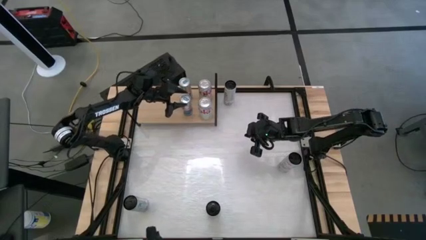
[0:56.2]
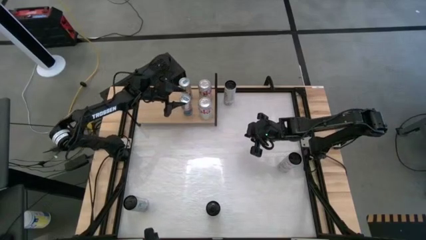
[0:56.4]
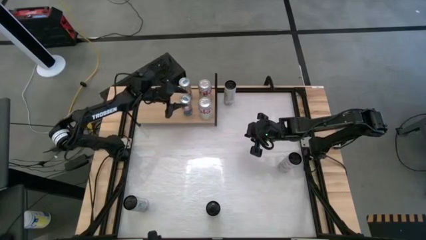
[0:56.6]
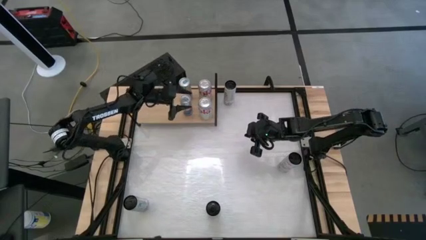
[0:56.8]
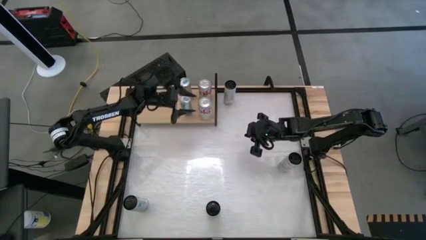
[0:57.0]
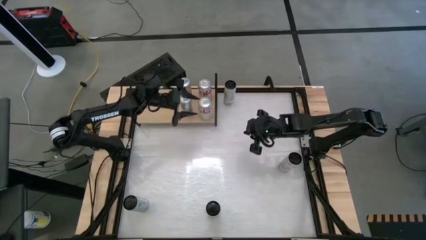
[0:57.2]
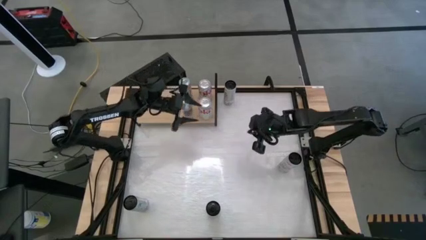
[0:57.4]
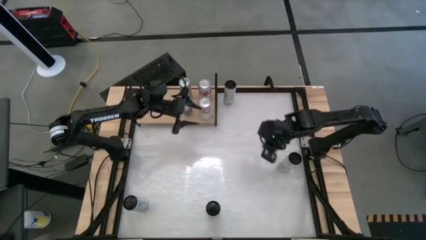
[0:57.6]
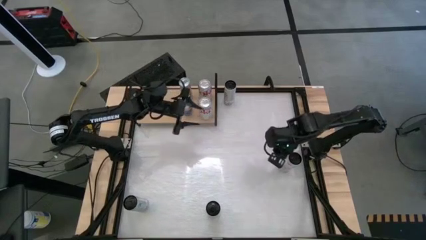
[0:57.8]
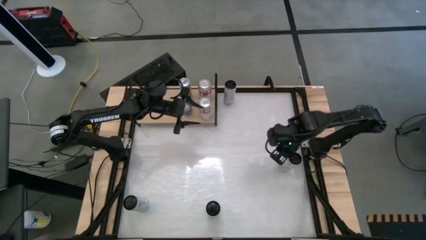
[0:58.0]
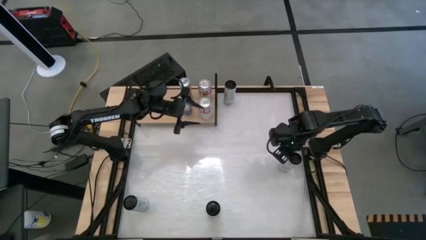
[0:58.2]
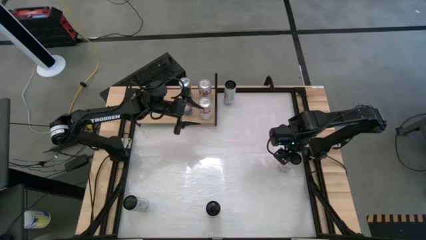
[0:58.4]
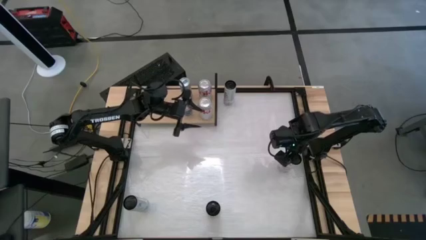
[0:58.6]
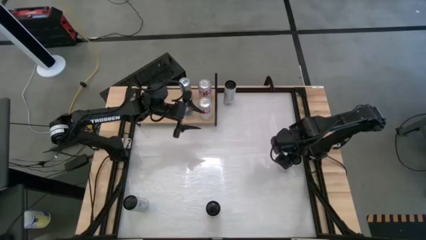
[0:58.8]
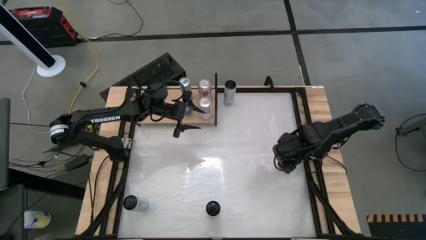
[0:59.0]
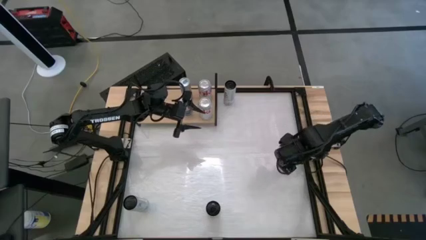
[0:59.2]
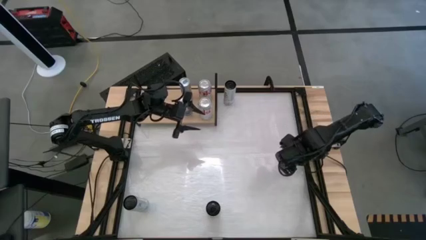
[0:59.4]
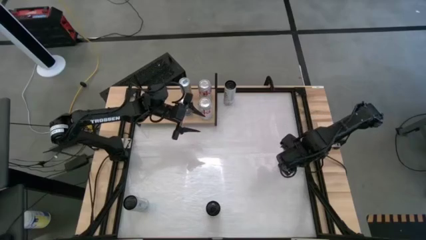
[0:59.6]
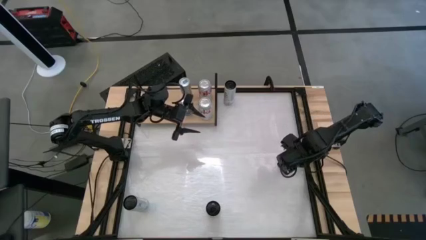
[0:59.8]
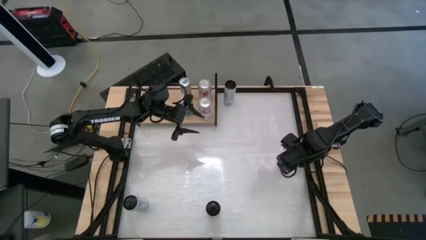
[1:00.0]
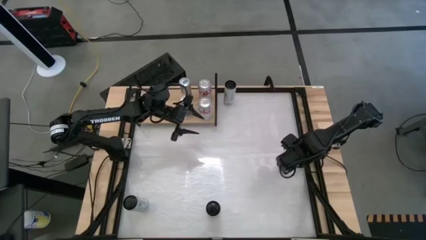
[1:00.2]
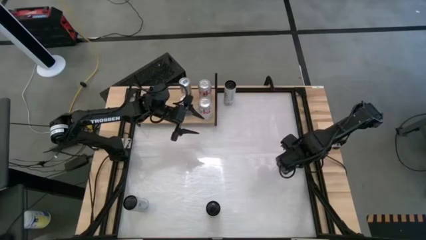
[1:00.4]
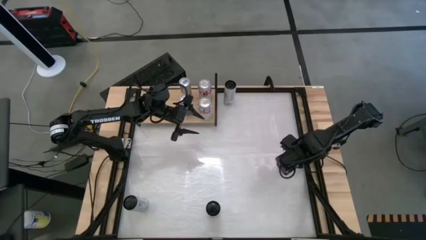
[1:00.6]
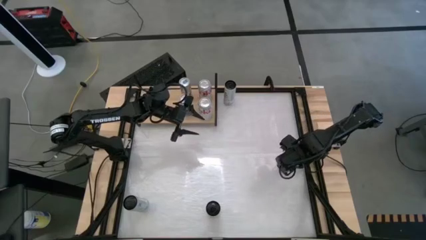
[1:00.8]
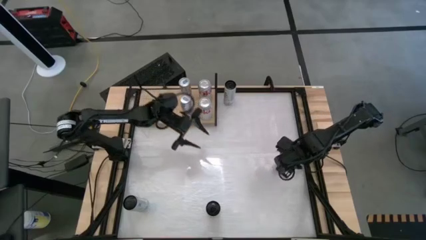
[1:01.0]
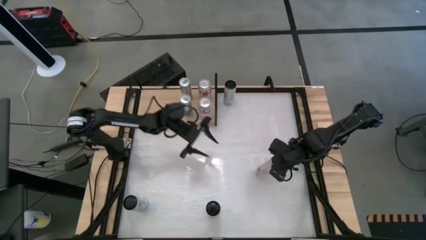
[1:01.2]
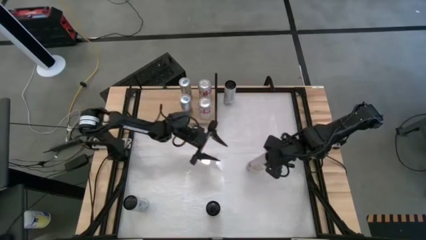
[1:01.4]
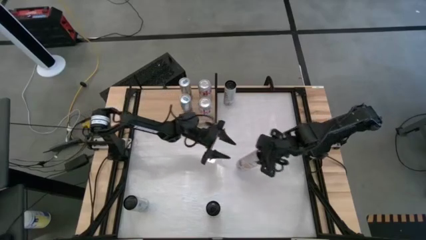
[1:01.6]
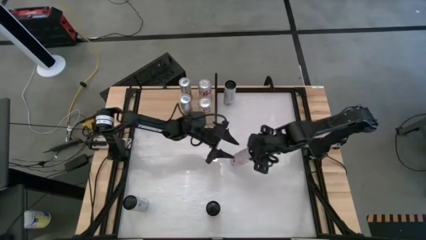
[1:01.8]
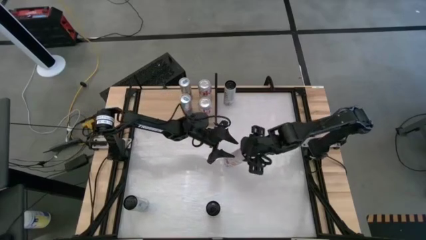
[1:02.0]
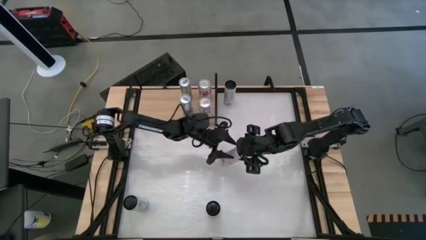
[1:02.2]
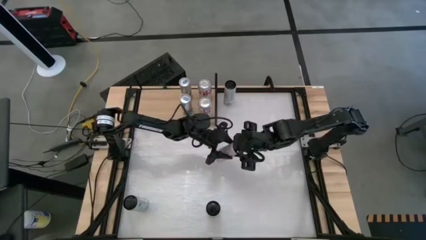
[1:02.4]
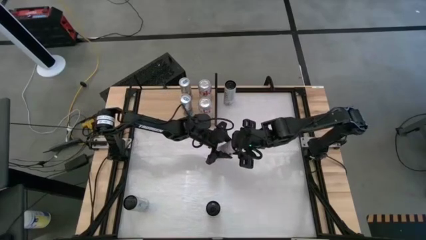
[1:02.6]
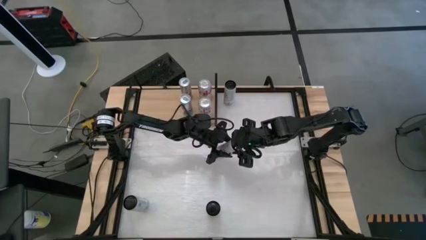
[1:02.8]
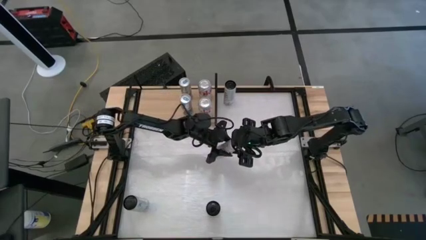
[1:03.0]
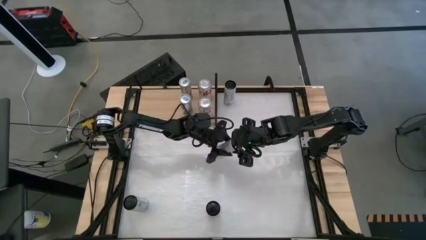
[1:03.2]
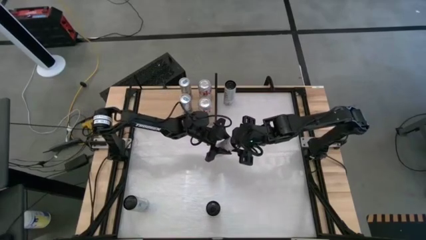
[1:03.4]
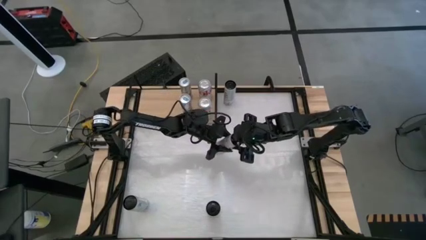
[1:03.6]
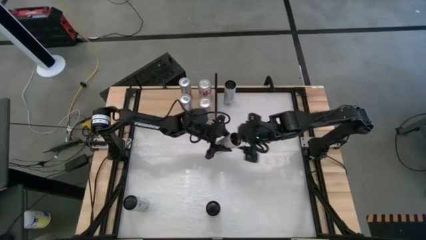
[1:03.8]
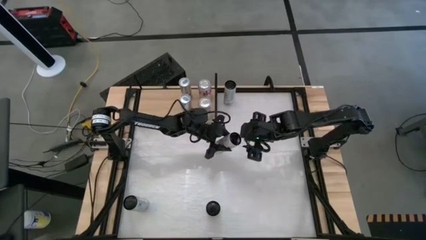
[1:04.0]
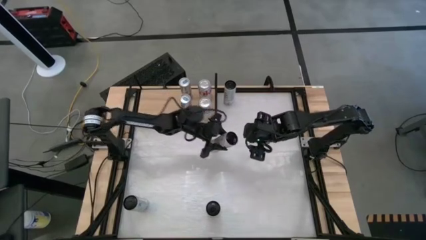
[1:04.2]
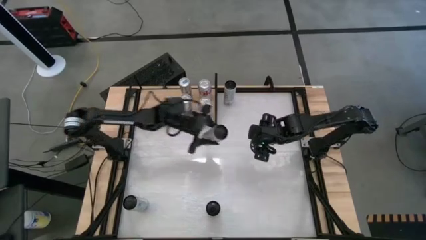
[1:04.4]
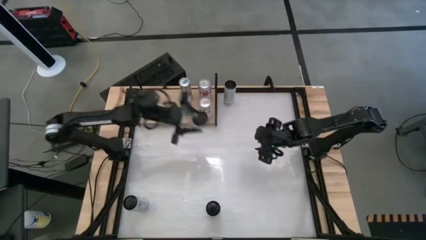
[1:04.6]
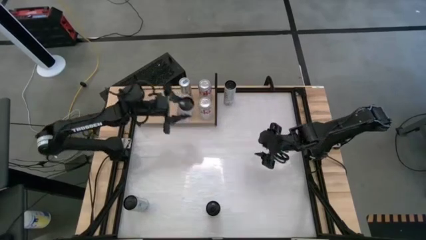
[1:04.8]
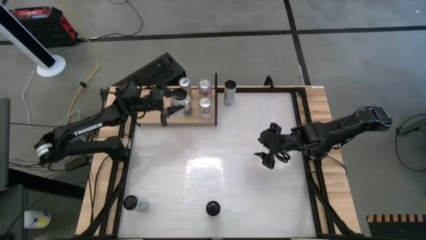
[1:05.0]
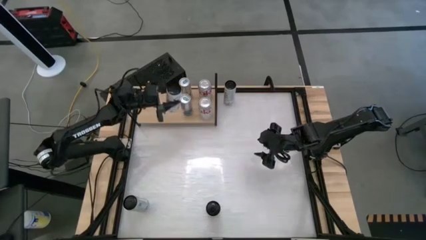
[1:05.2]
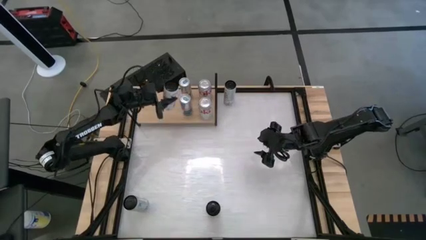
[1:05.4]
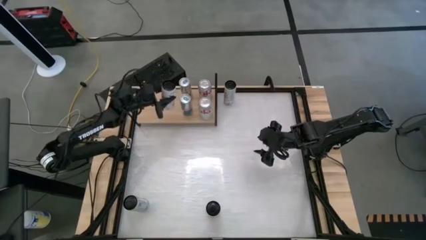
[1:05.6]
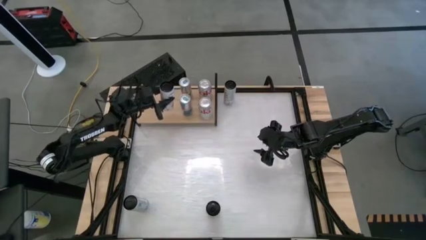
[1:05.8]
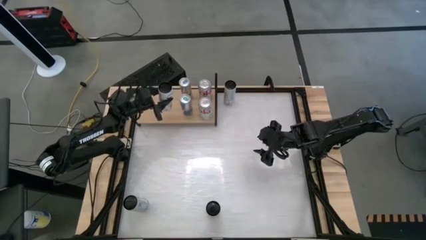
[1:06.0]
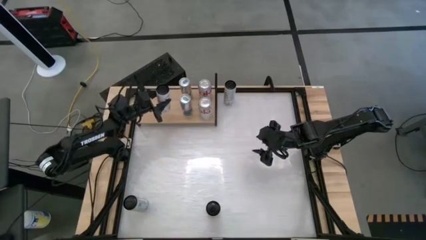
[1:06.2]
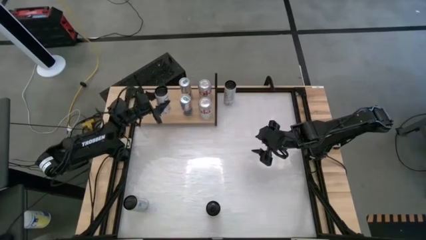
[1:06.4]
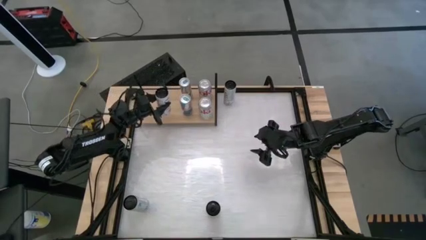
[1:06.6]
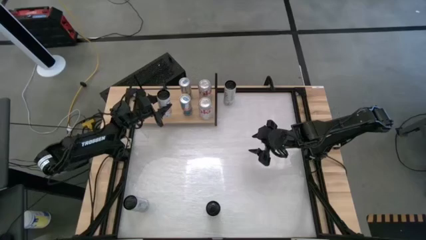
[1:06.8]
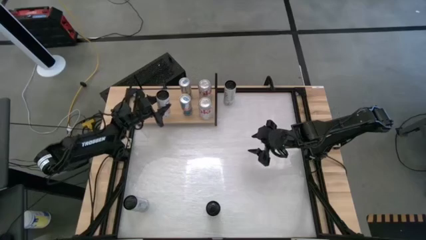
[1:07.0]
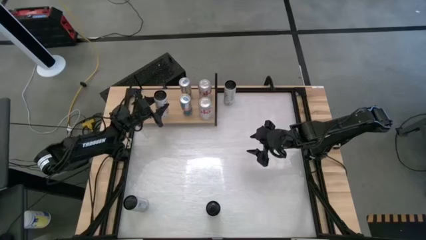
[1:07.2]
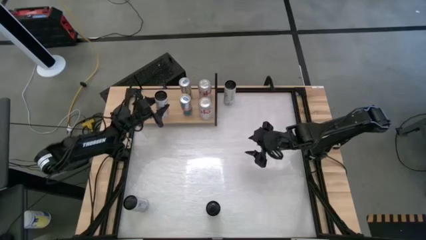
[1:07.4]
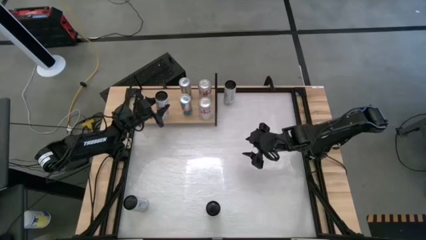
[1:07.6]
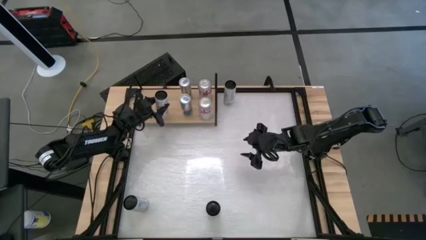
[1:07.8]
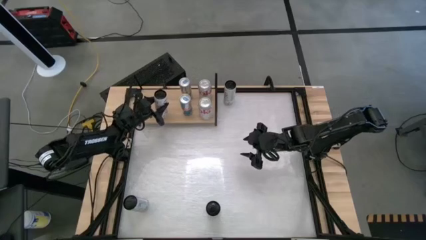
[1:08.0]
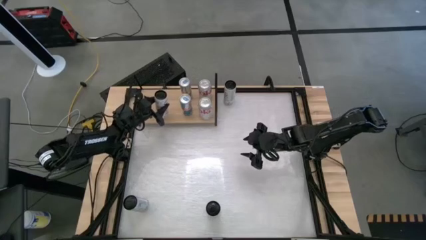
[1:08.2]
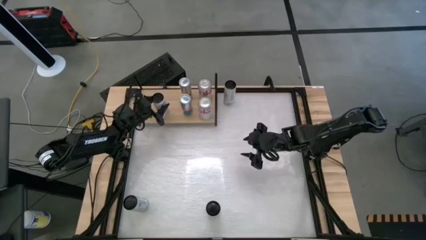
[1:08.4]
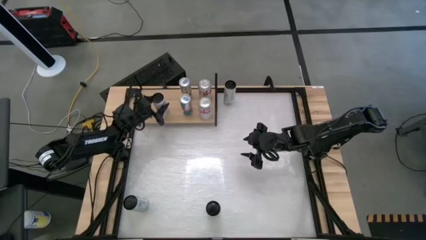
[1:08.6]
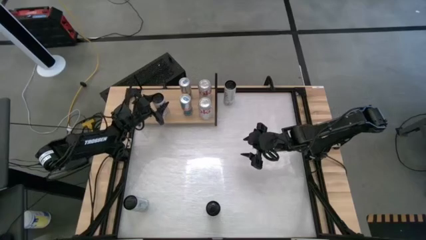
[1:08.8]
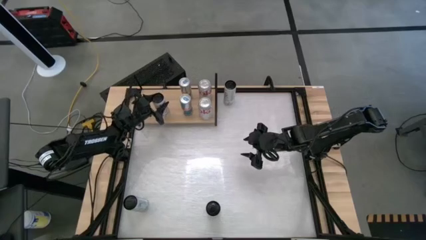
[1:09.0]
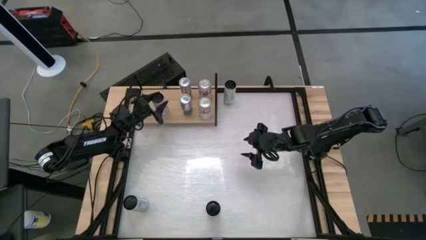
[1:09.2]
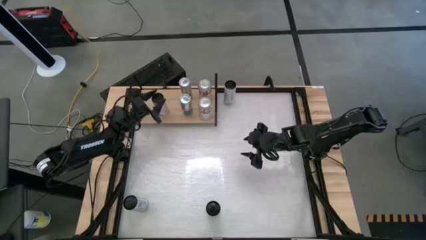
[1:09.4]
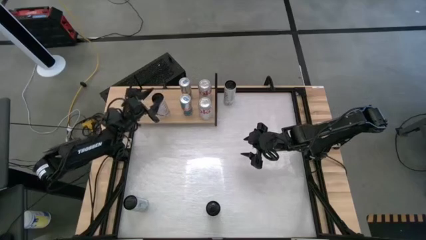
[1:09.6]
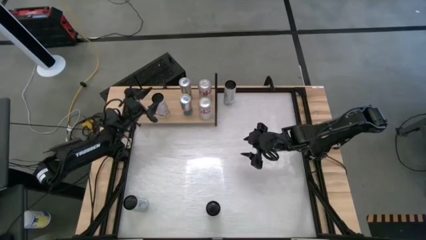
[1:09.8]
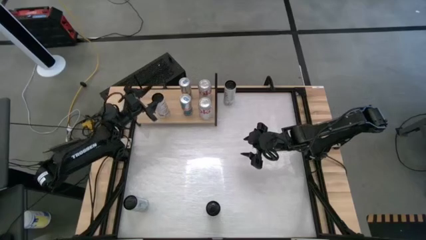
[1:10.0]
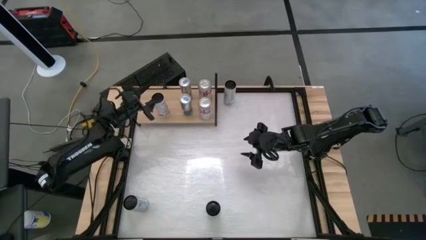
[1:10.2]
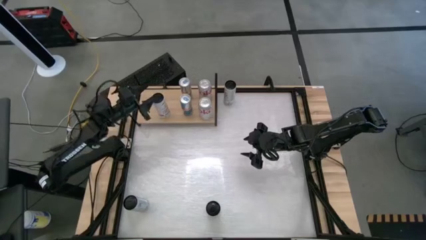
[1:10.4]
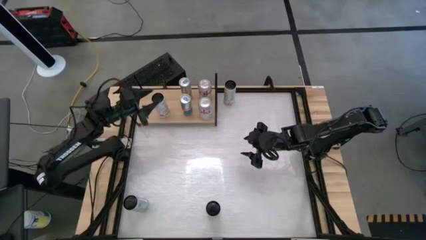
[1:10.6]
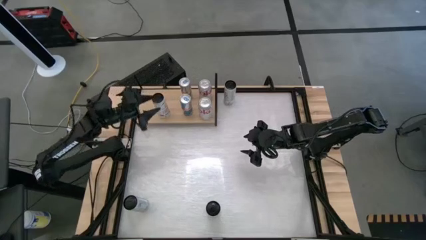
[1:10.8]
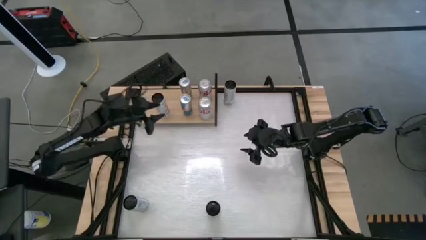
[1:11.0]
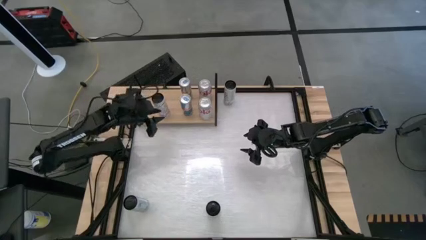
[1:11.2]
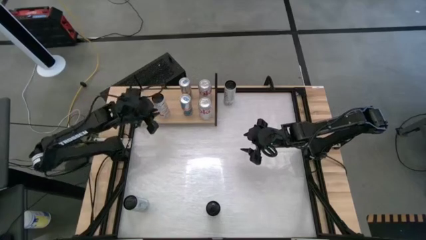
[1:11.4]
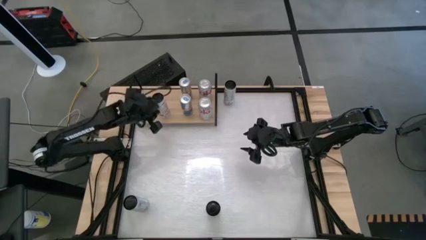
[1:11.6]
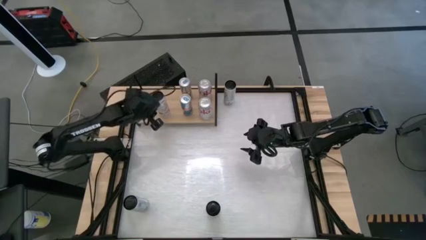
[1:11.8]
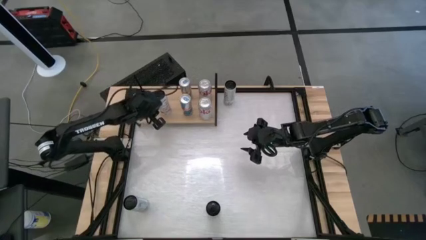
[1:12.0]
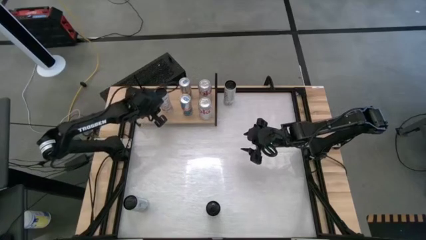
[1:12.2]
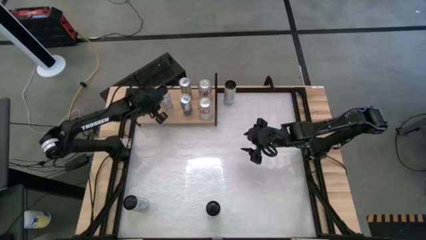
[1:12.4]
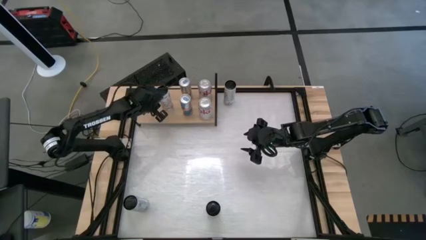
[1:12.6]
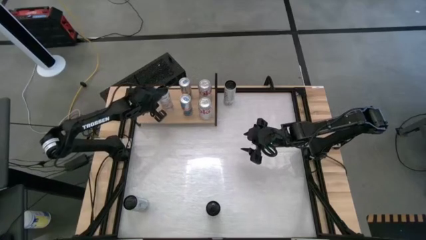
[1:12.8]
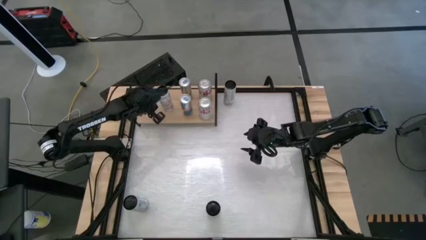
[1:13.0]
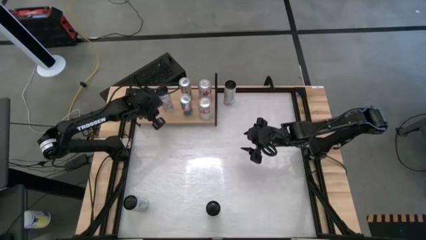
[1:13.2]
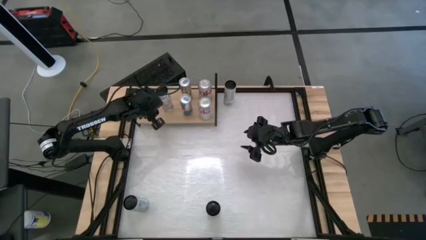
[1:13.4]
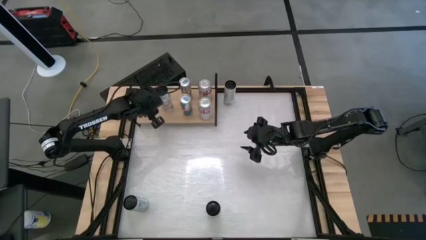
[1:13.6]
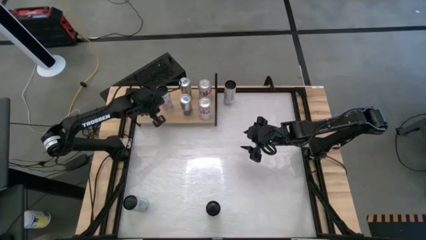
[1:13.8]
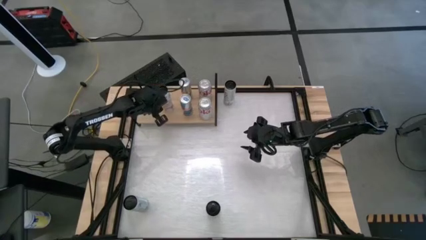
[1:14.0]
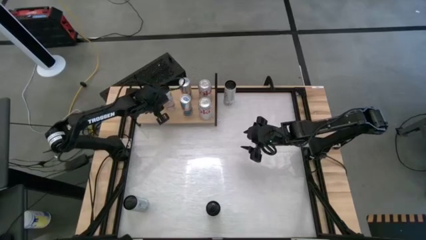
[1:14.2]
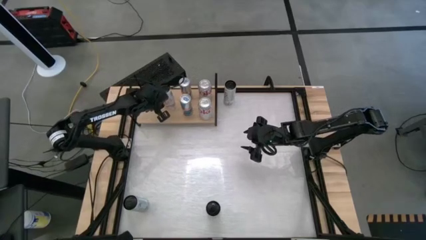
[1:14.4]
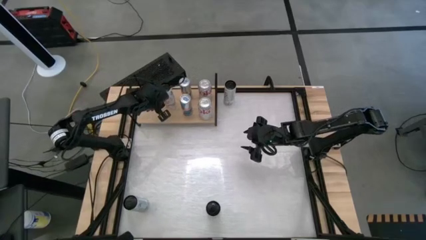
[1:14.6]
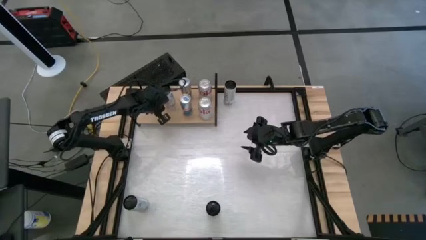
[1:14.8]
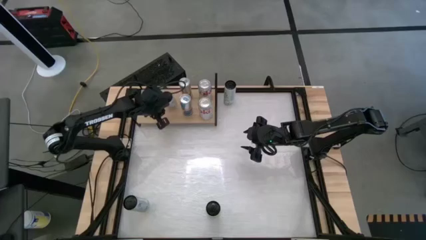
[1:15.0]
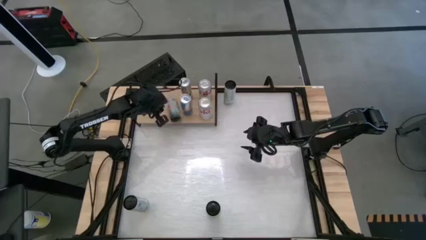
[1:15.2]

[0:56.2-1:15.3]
Task: Place canned beverage on shelf
Put the right pink soda can on the shelf
